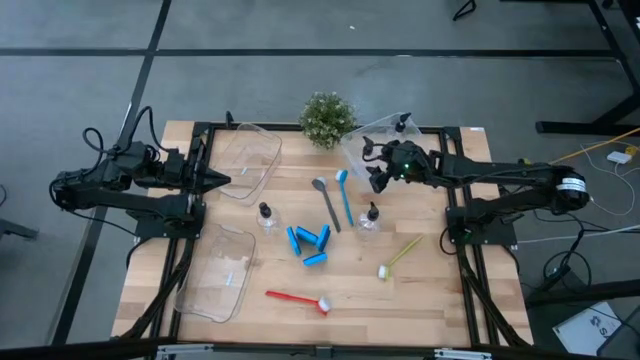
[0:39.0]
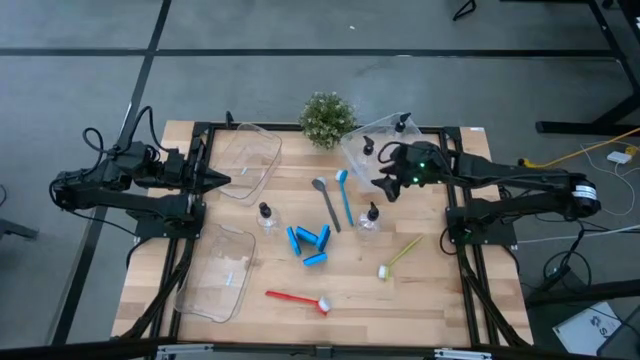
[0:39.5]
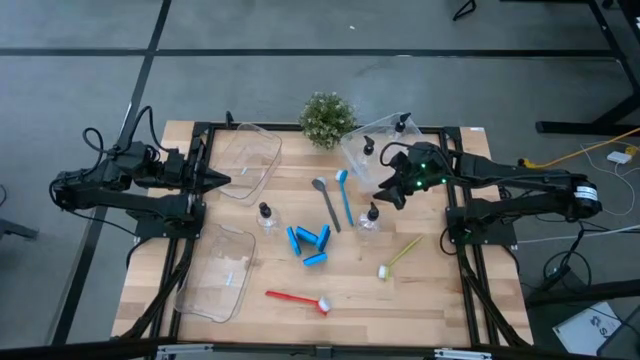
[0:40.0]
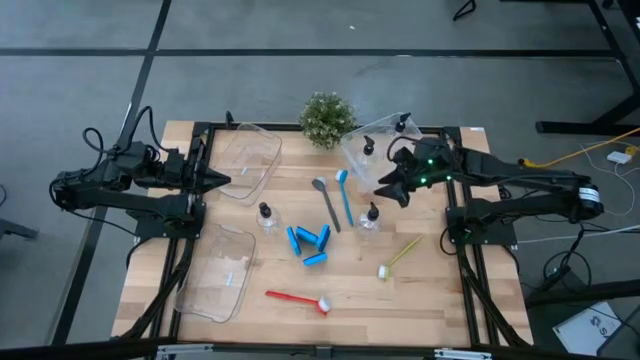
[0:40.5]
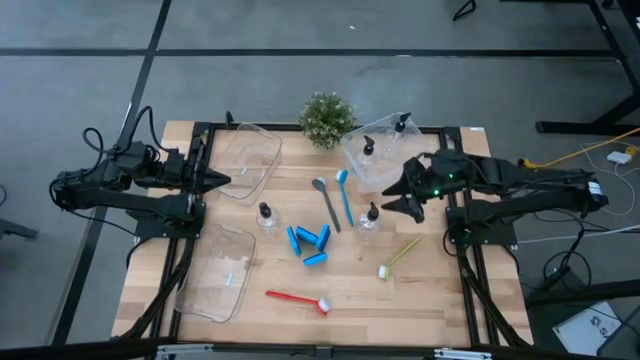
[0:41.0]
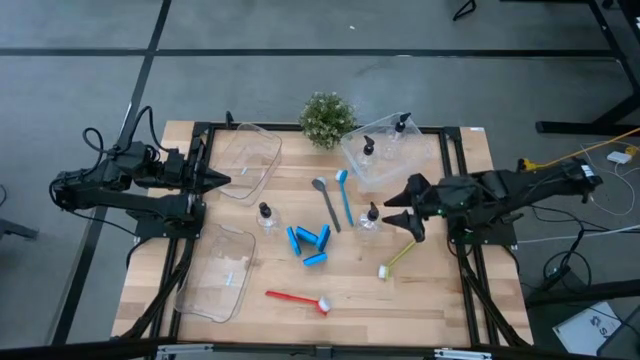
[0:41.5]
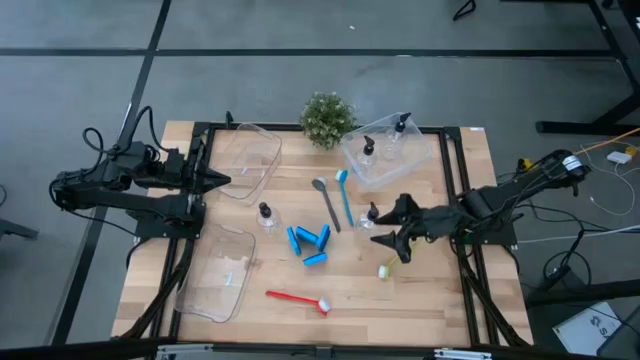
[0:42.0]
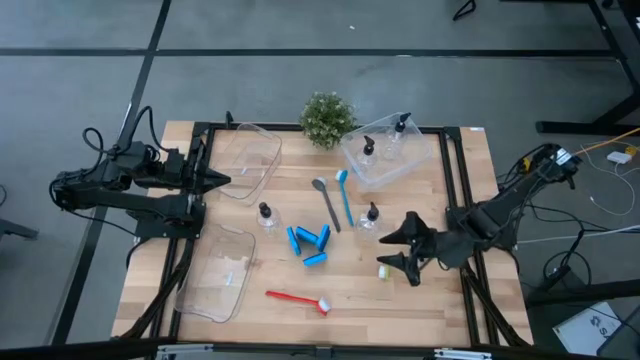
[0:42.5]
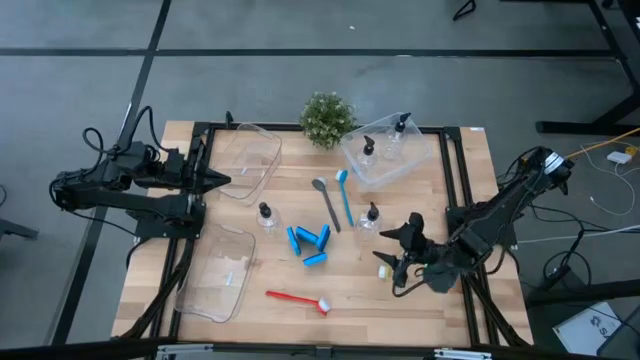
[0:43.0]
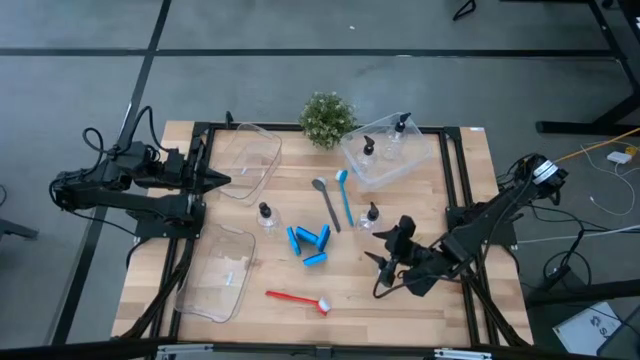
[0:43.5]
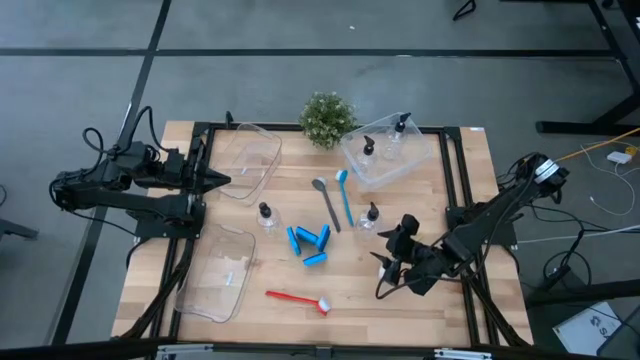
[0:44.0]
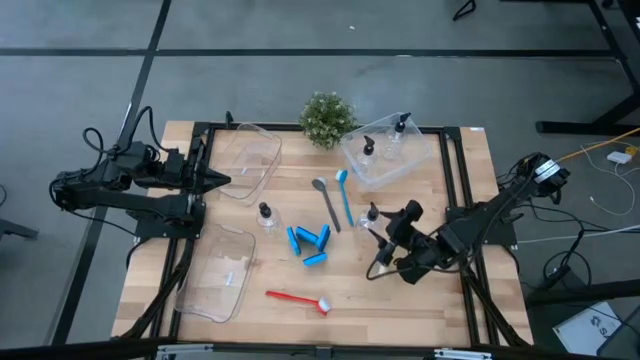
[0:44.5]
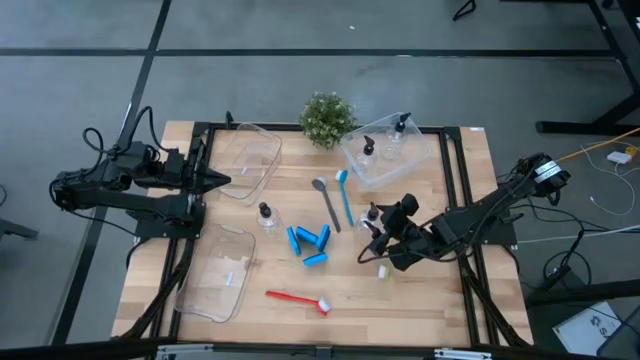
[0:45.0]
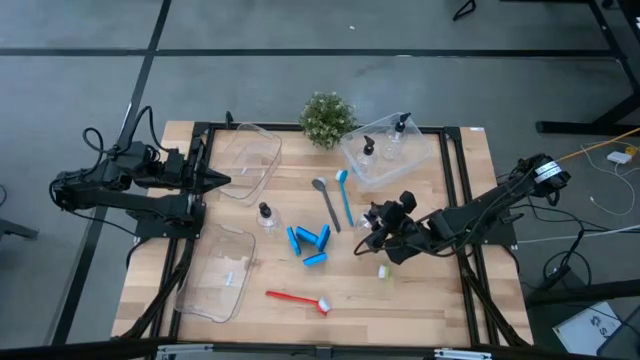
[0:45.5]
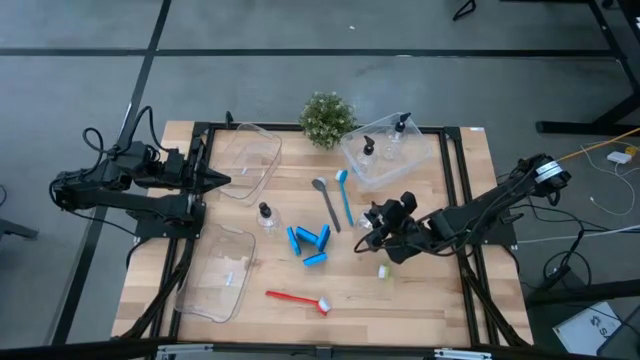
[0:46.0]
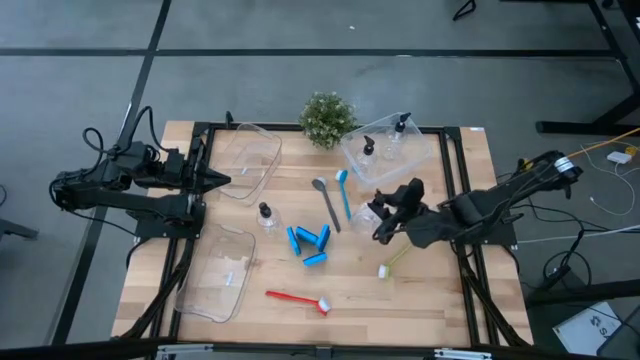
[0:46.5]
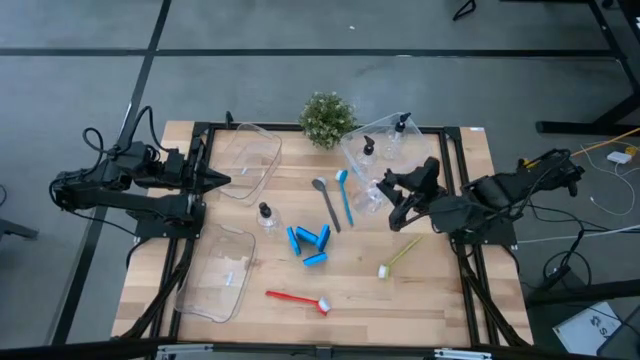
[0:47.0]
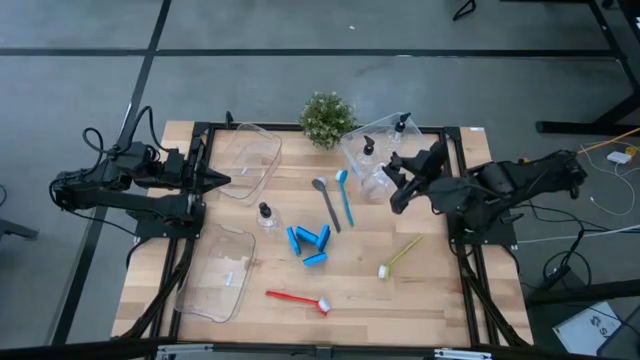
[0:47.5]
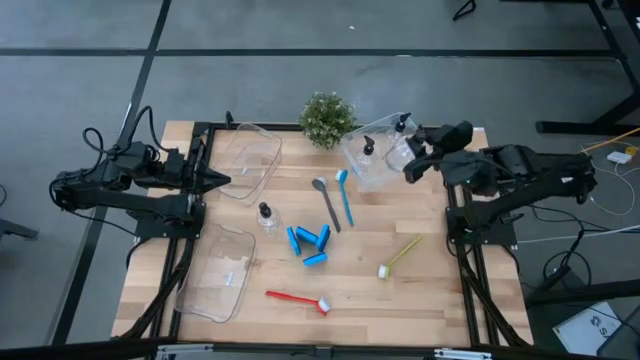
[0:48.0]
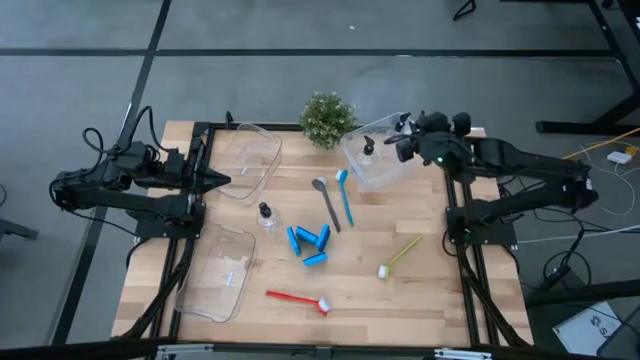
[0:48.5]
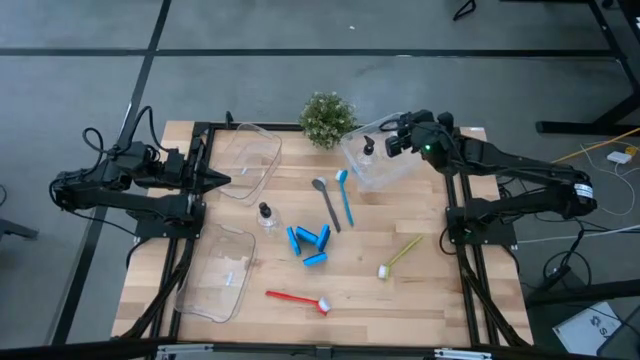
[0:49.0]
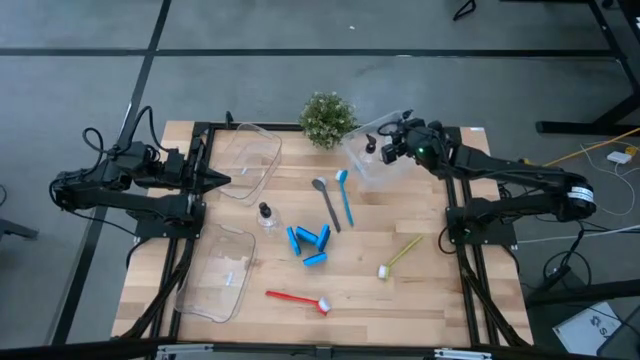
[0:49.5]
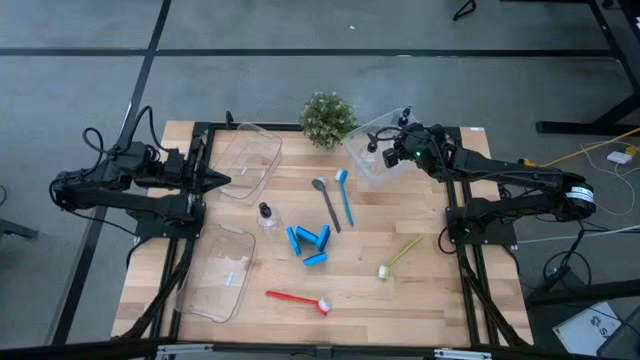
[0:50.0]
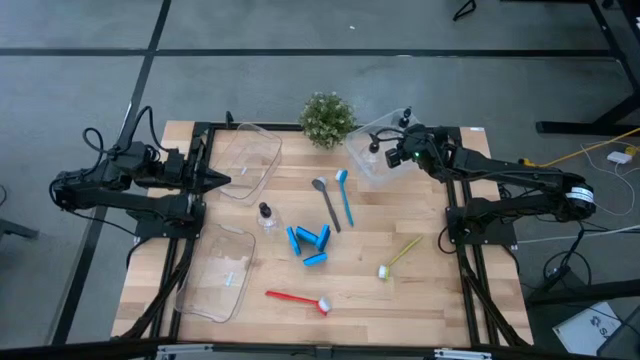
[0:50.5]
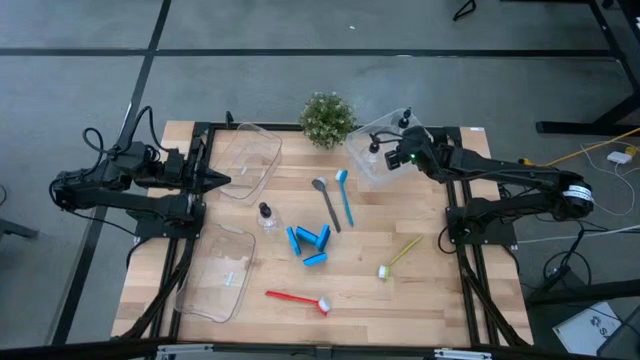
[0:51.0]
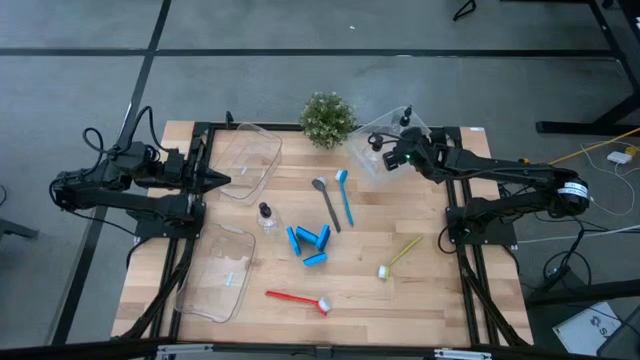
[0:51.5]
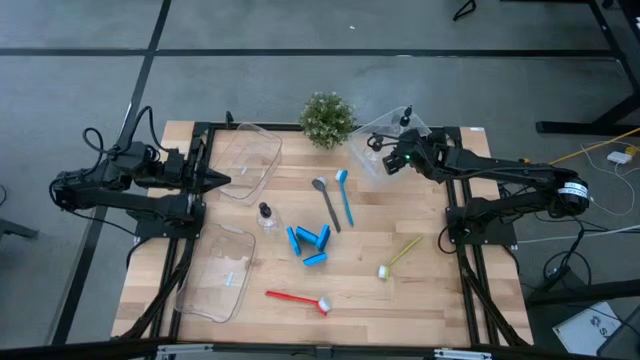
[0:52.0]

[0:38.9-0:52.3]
Task: Pick & Place Kitchen Sink Supplies
Put the soap dispenser into the white bin

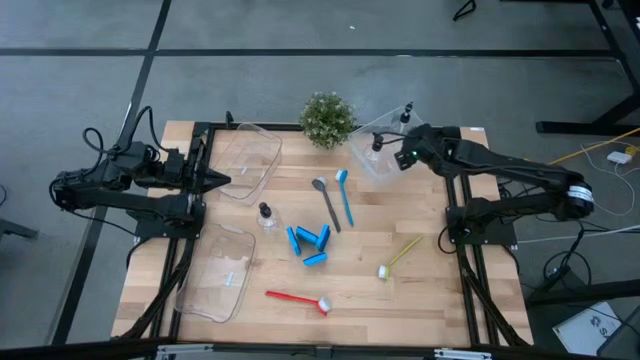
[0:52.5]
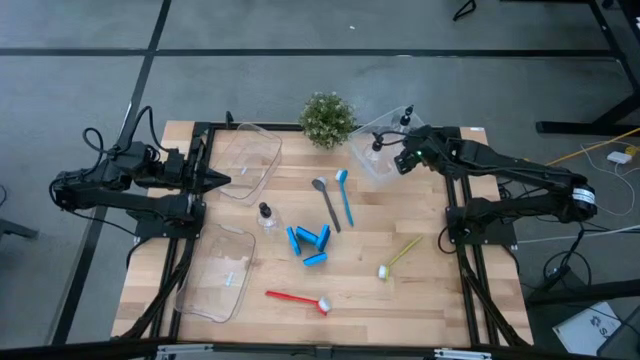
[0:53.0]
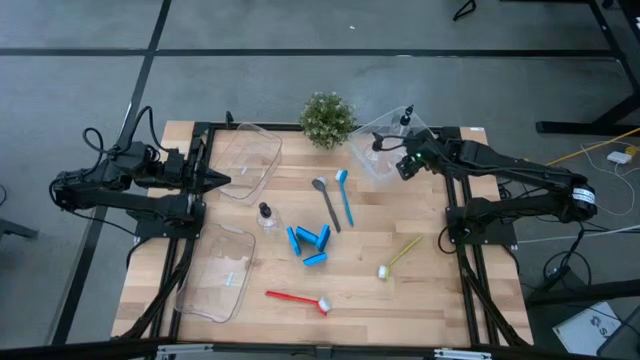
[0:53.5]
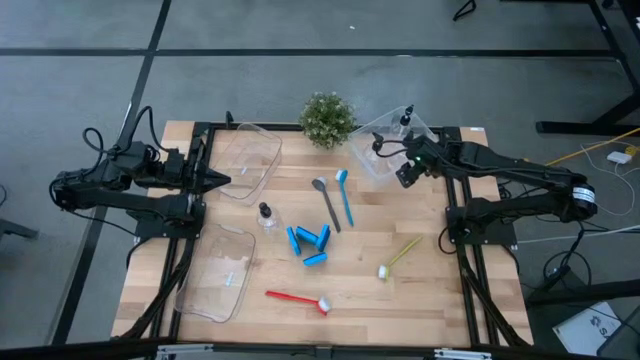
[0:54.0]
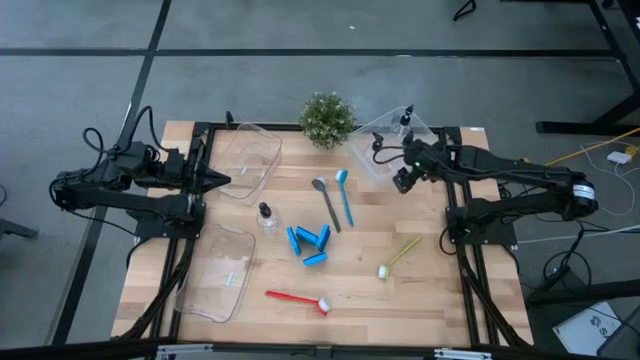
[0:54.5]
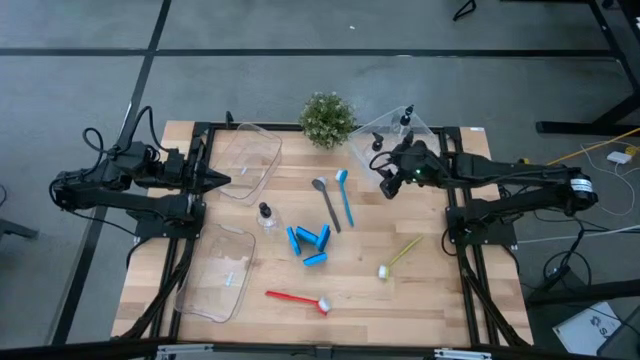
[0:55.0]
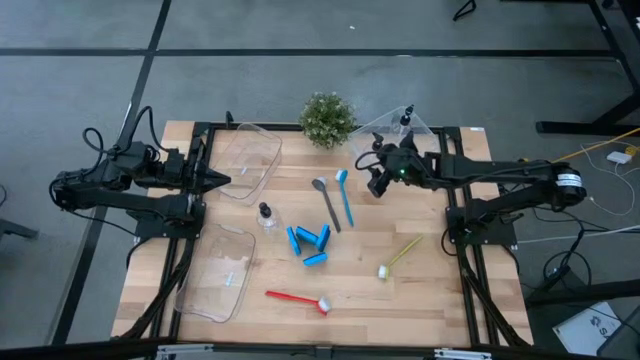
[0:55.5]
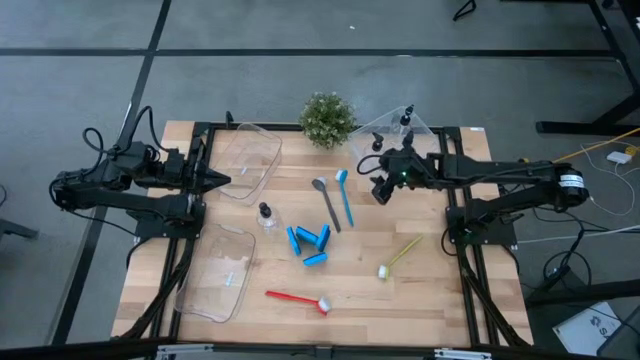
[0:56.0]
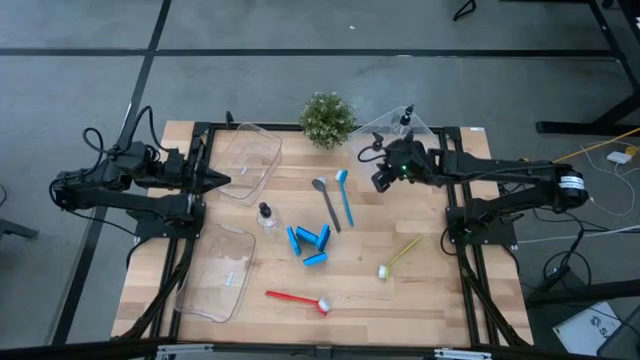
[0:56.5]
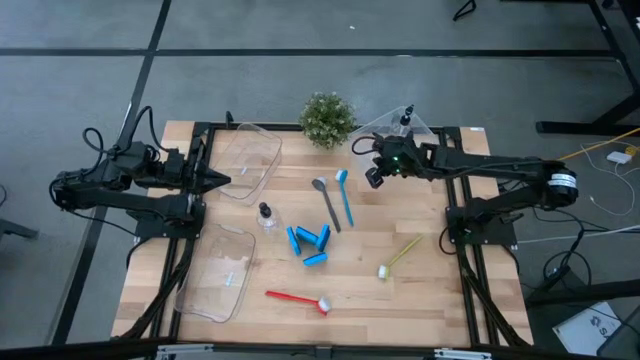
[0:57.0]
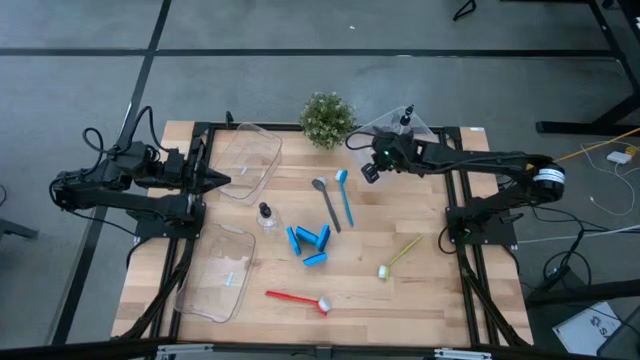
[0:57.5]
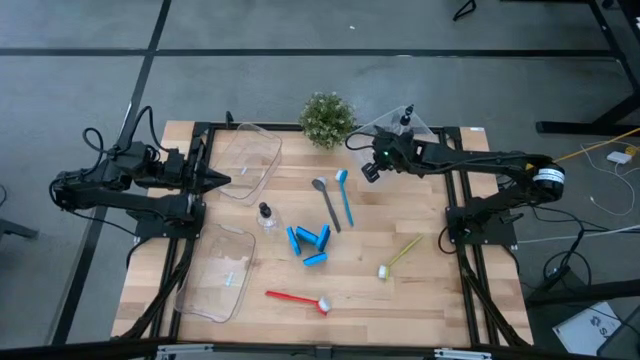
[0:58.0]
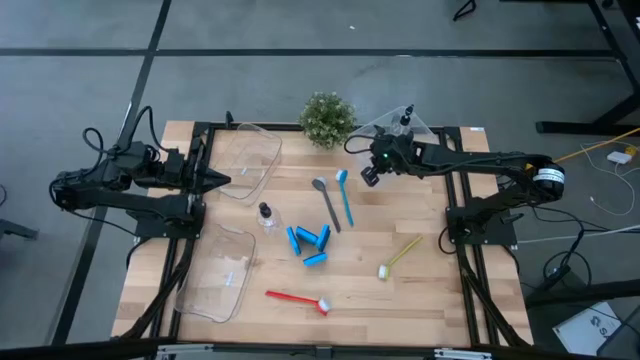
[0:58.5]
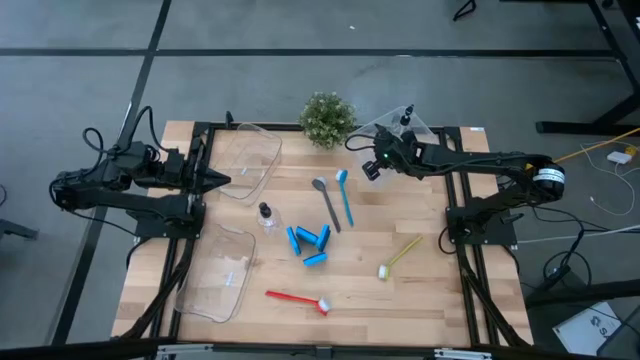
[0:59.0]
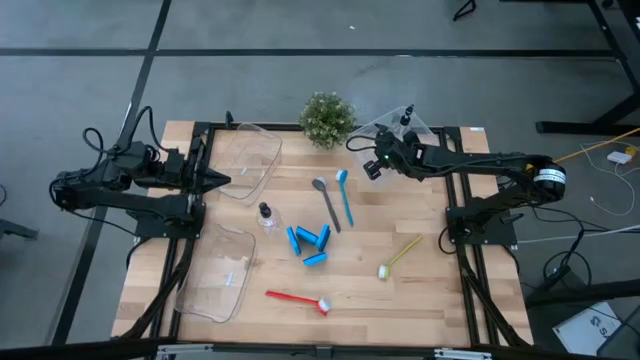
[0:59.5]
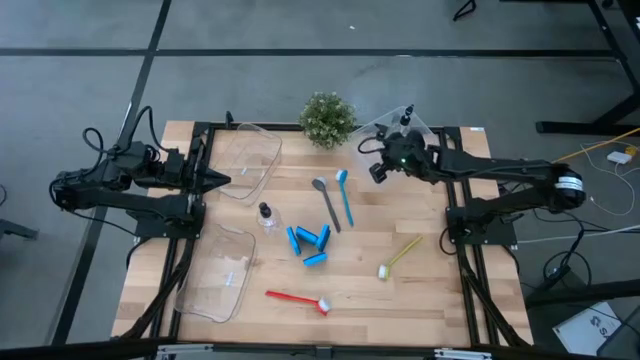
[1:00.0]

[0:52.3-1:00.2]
Adjust the soap dispenser in the white bin
